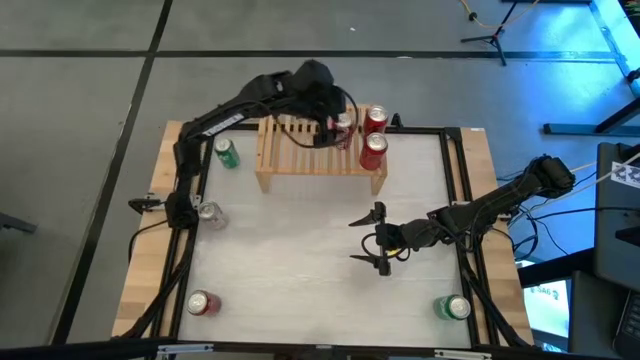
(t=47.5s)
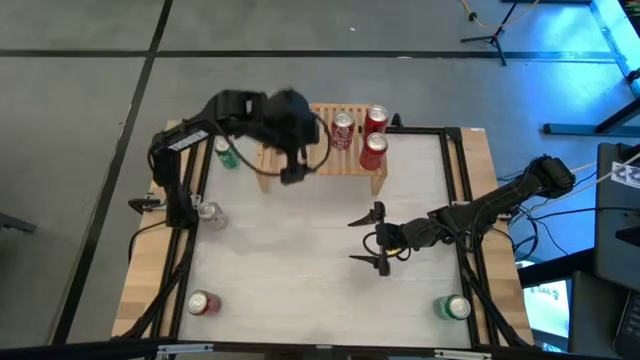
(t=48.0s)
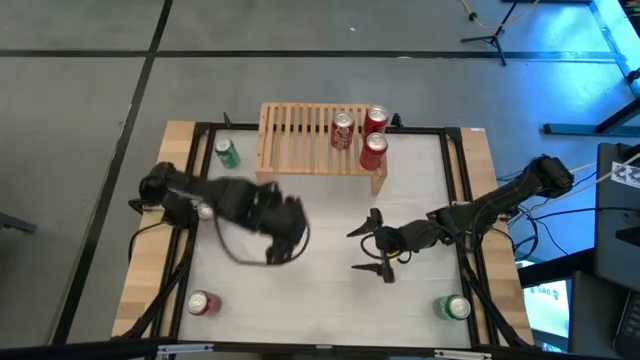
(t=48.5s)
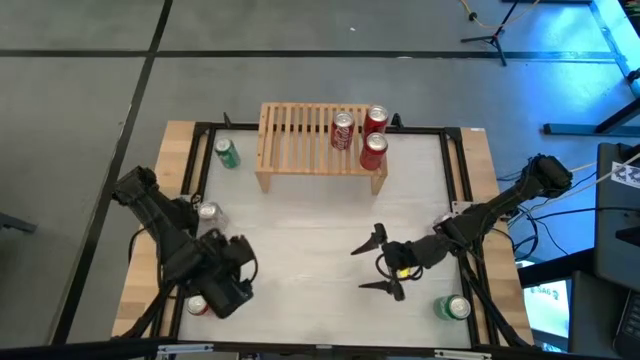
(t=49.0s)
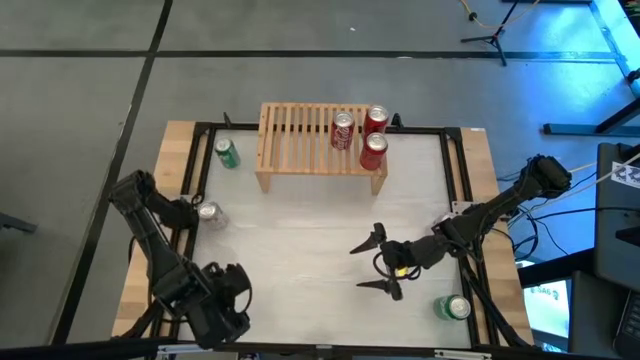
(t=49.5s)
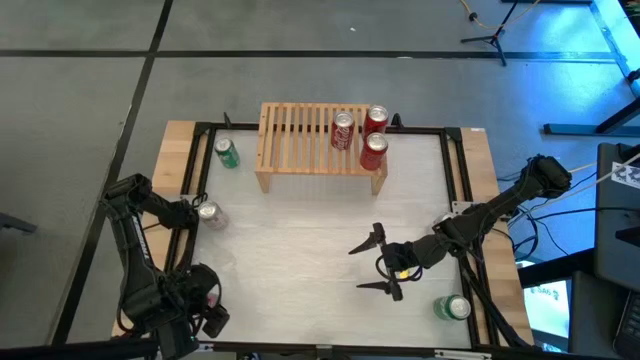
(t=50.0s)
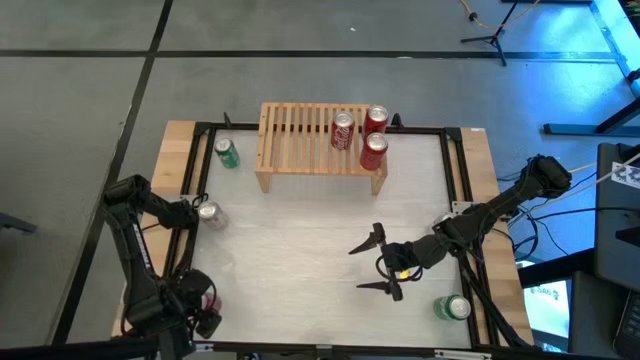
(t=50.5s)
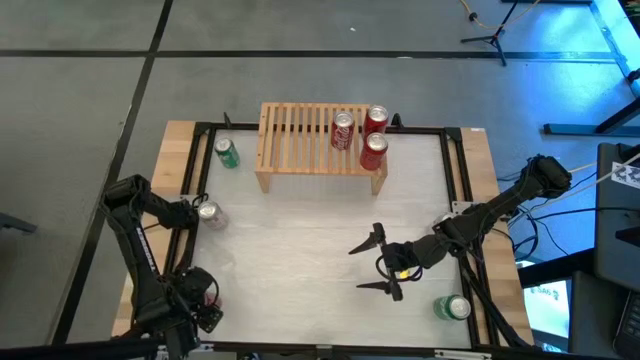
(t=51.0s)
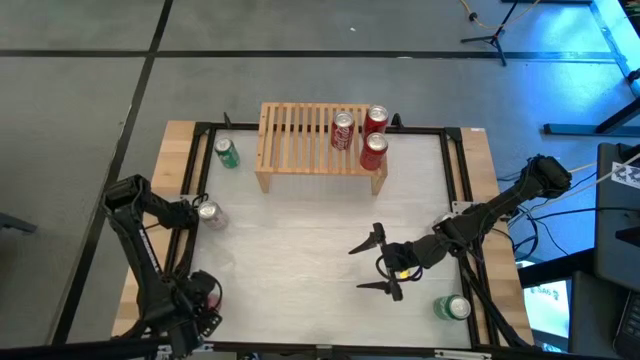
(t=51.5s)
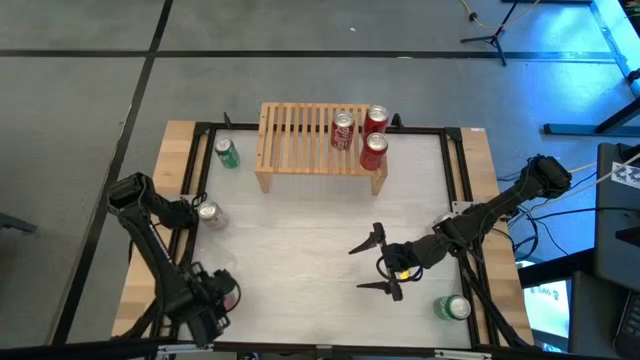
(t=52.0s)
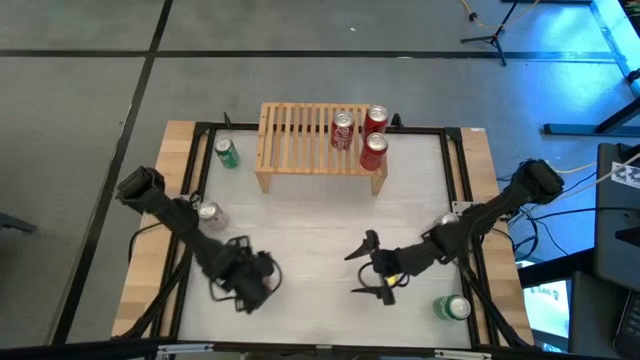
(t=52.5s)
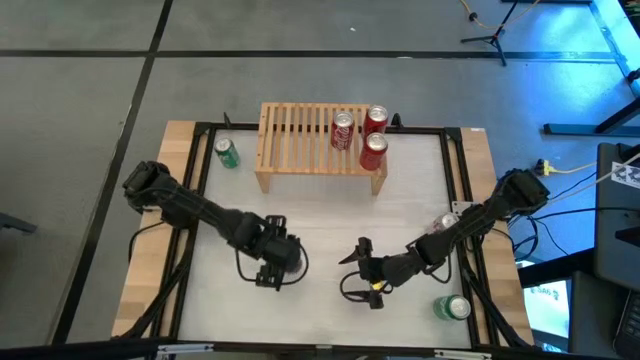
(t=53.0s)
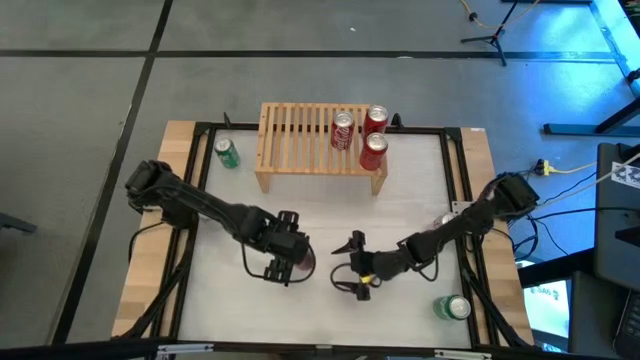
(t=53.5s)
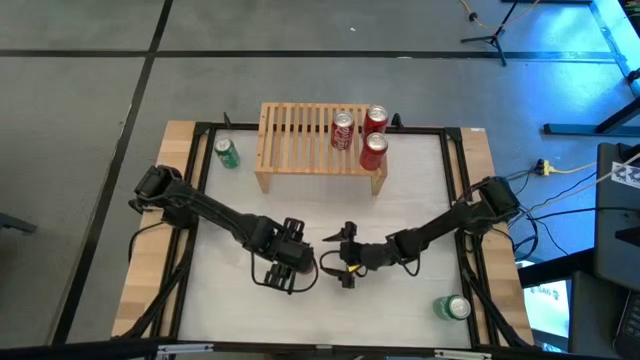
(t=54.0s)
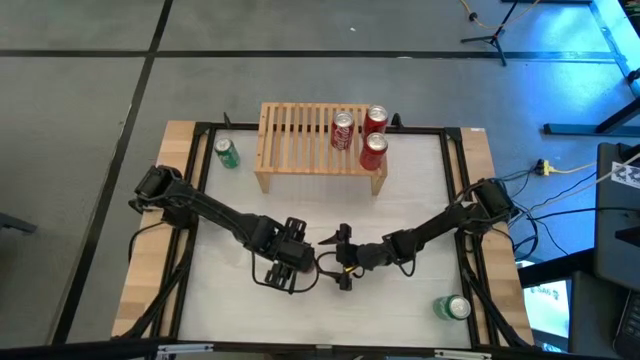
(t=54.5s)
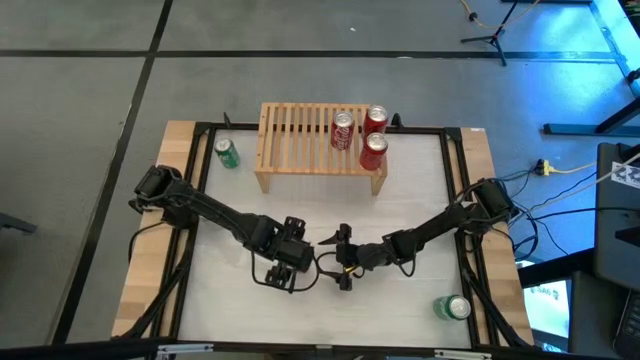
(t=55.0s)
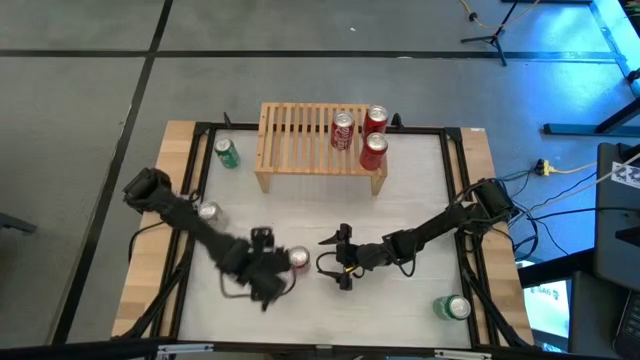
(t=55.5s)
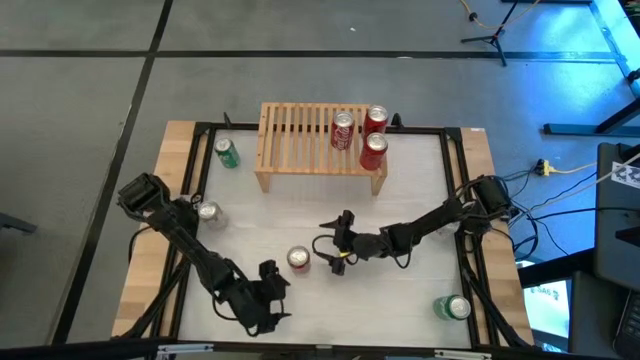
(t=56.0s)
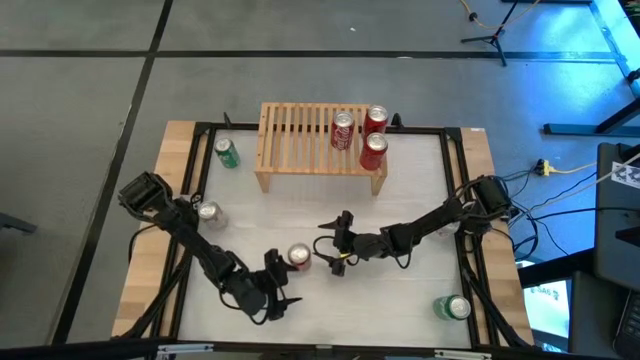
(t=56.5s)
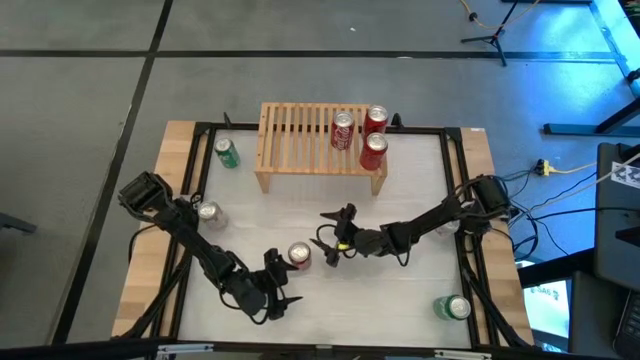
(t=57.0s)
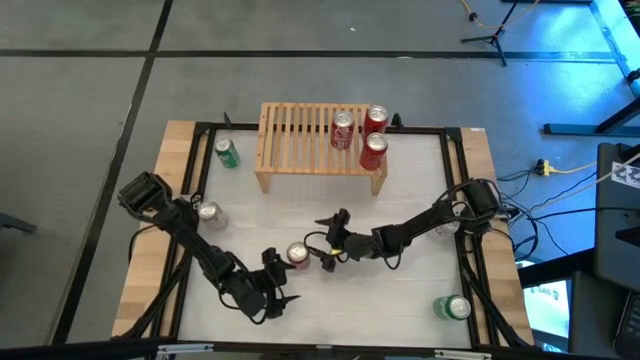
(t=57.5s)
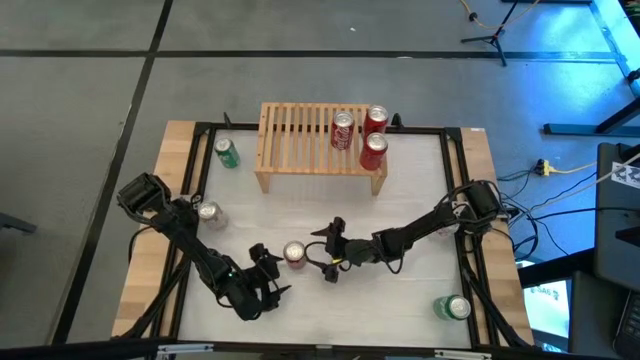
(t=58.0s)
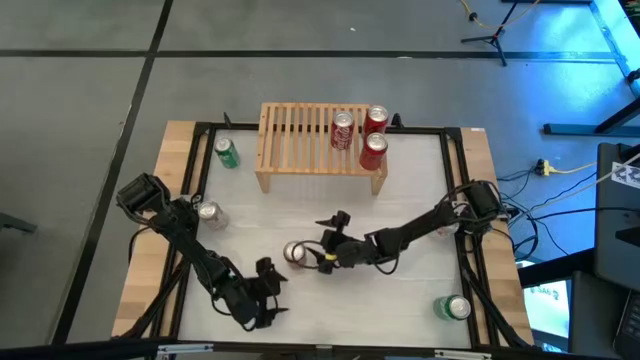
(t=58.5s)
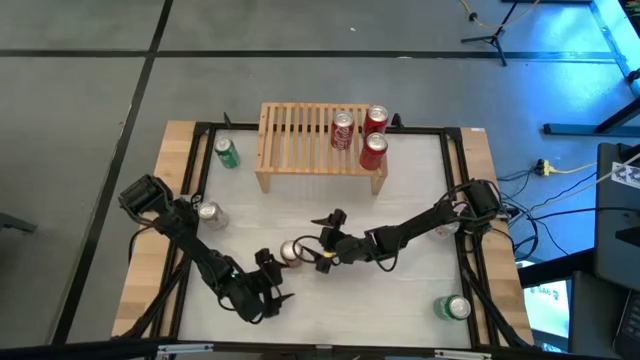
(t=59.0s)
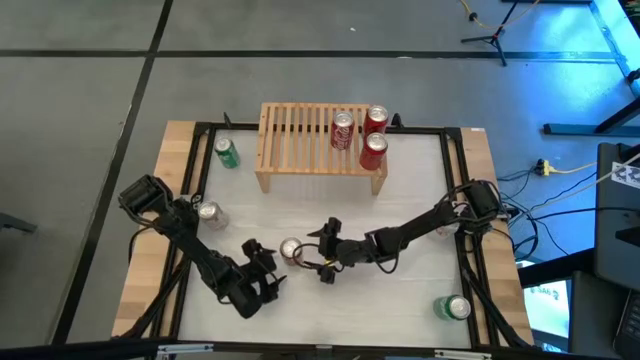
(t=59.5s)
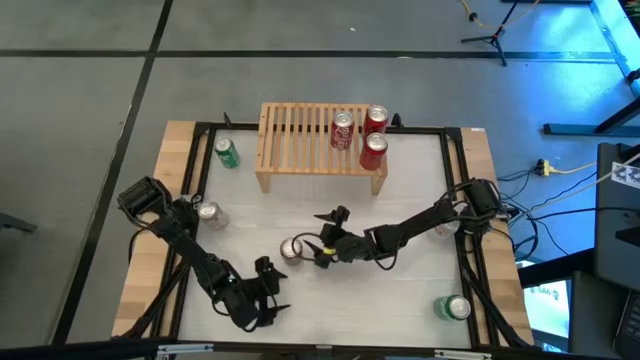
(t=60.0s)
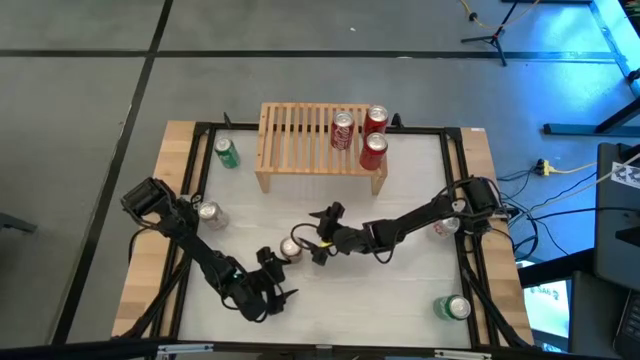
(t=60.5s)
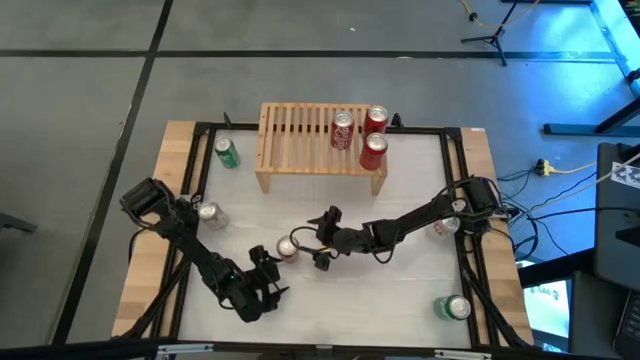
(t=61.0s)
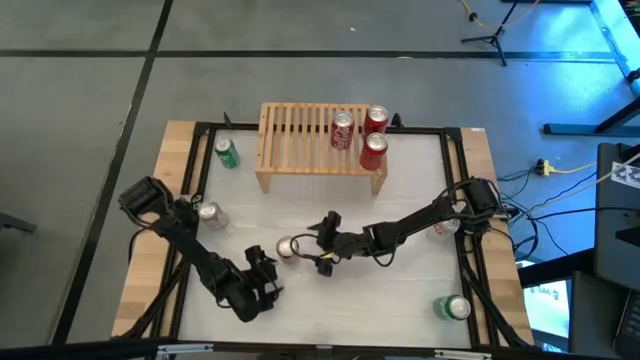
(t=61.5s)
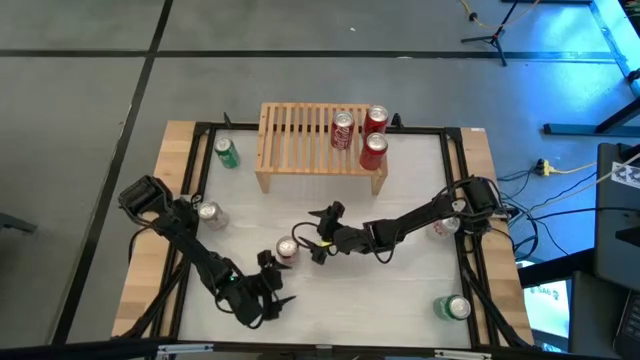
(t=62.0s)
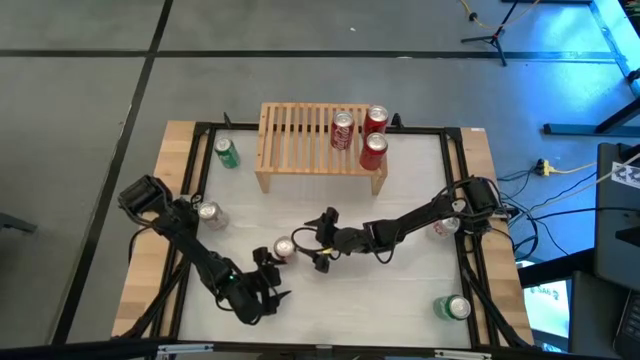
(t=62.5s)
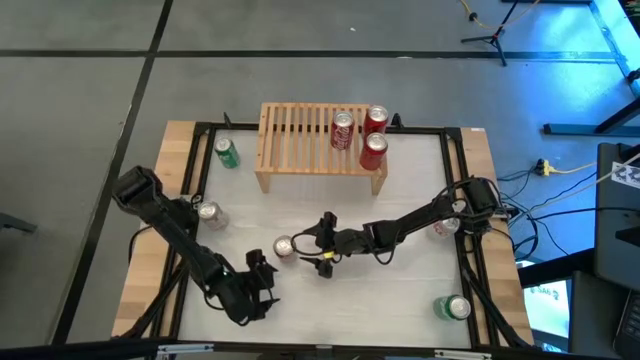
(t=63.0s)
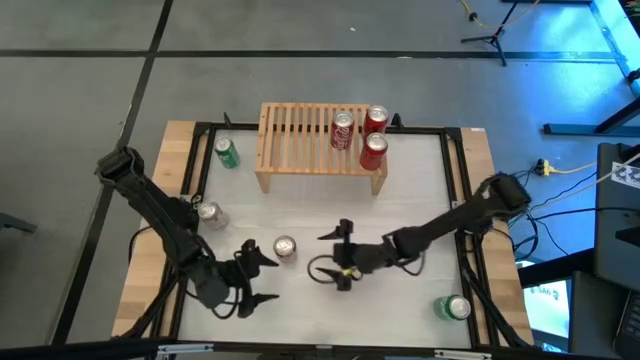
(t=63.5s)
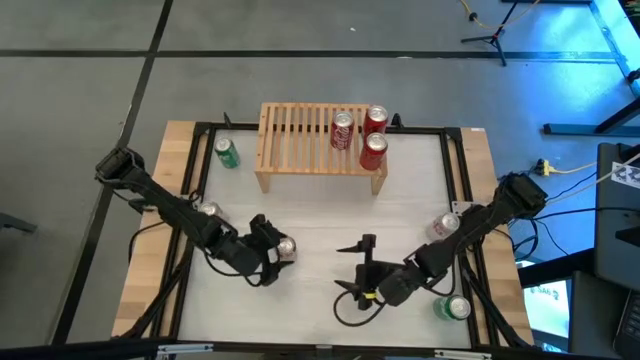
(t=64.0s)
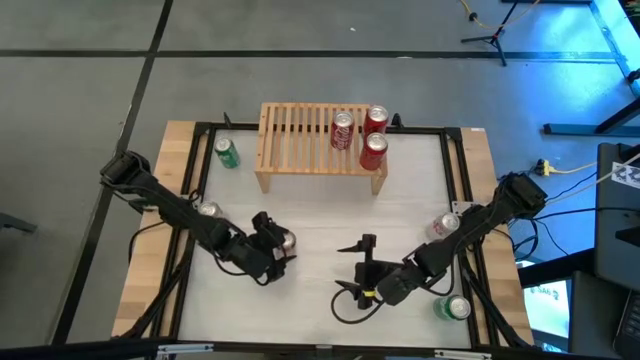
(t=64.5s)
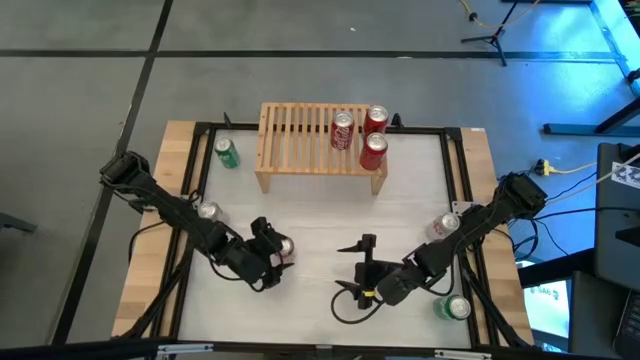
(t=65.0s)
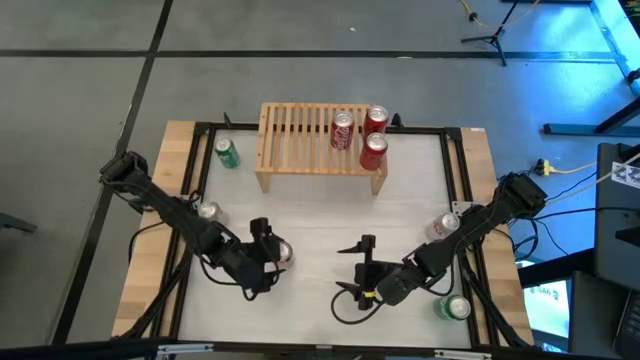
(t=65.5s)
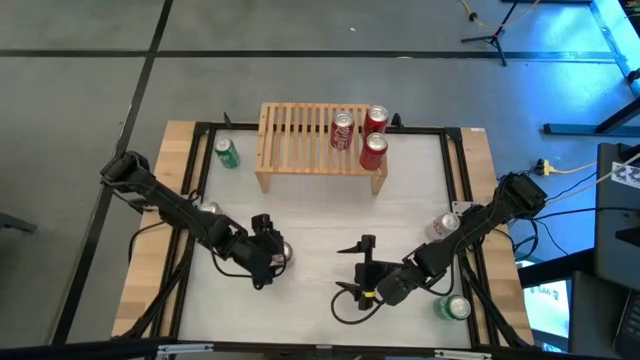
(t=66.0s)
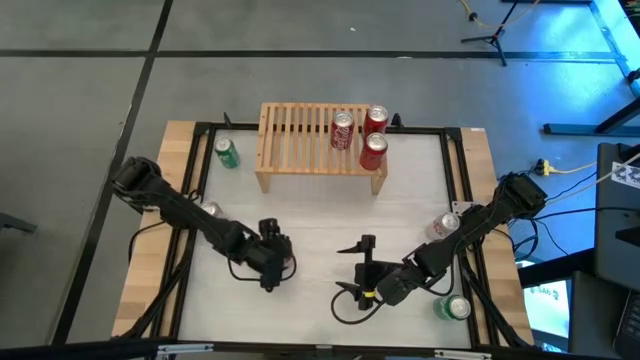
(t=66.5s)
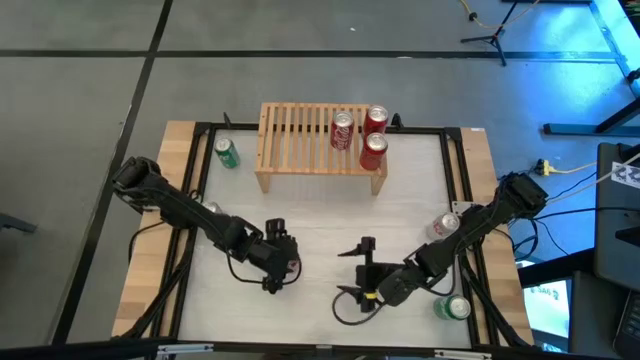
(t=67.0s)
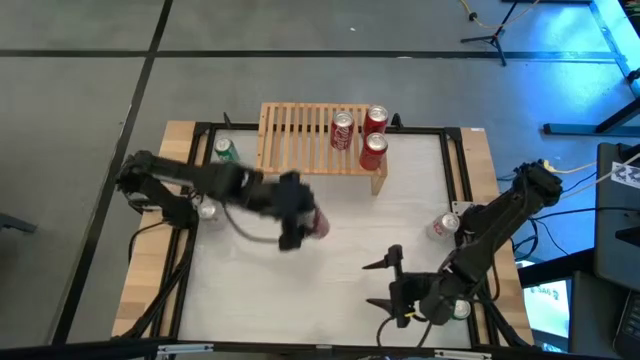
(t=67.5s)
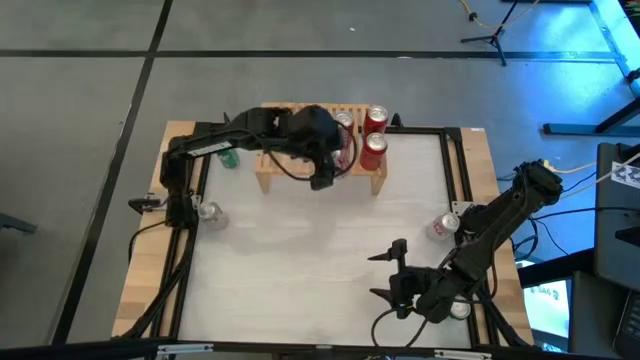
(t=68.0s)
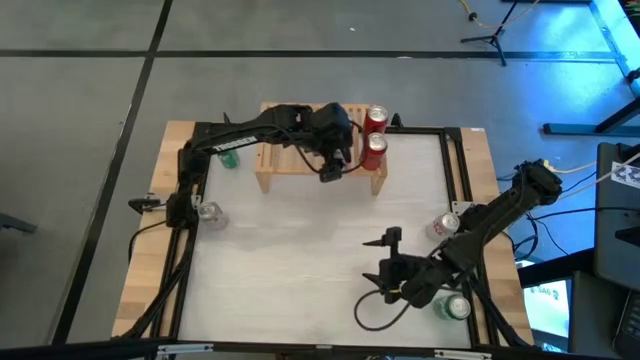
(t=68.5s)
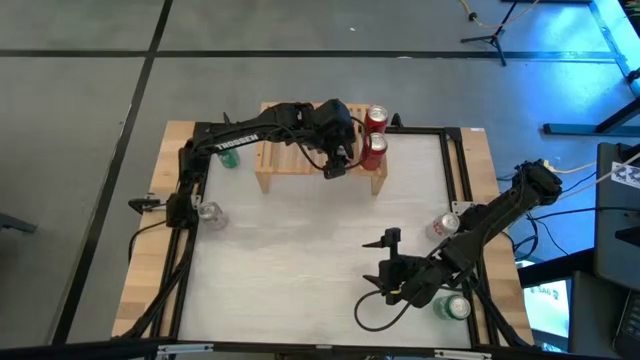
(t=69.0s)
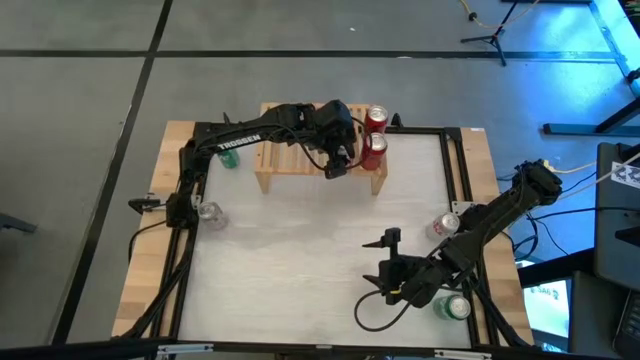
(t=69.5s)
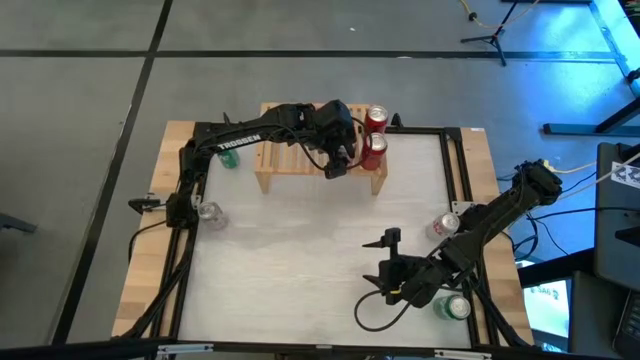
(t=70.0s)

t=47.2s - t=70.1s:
Task: Place canned beverage on shelf
Put the red white soda can on the shelf
